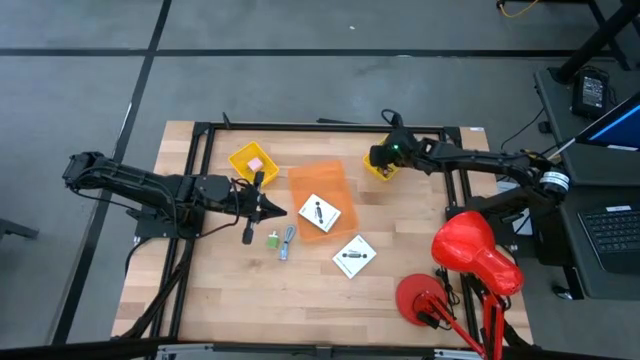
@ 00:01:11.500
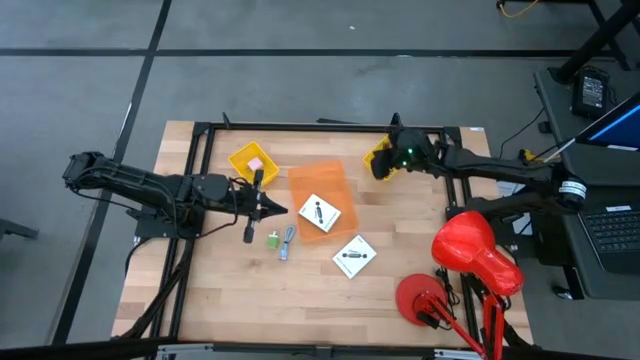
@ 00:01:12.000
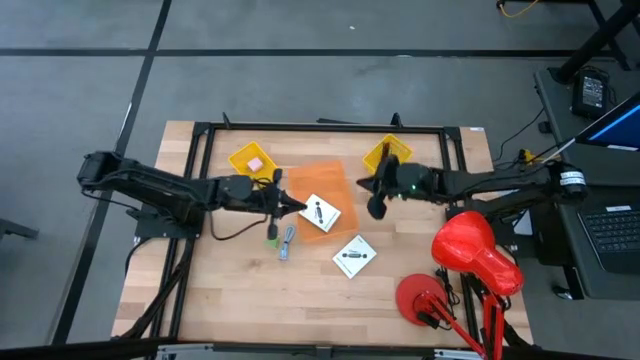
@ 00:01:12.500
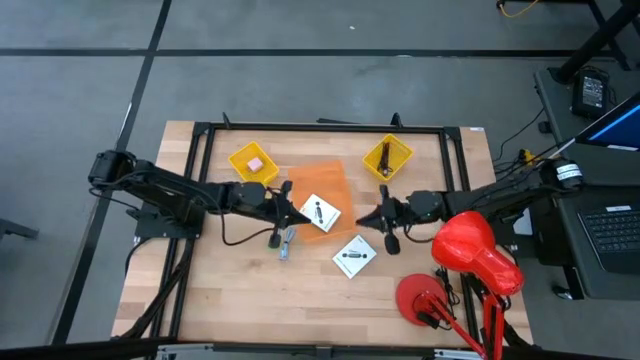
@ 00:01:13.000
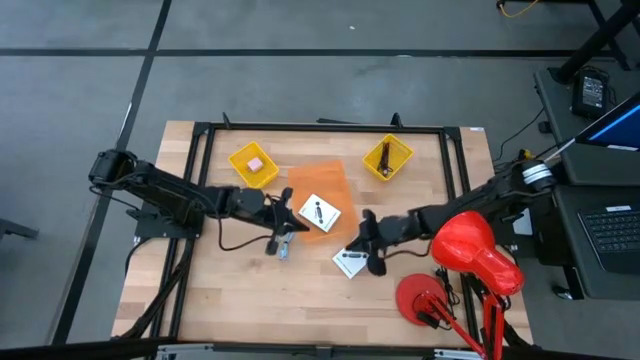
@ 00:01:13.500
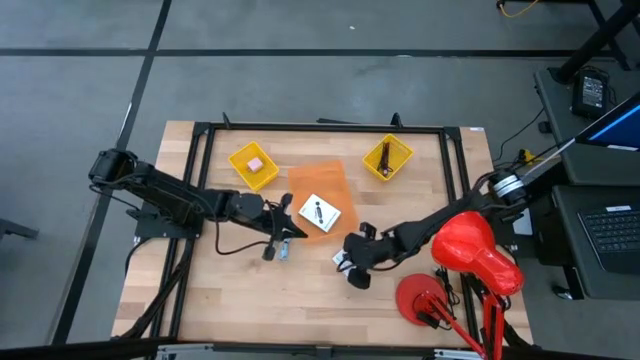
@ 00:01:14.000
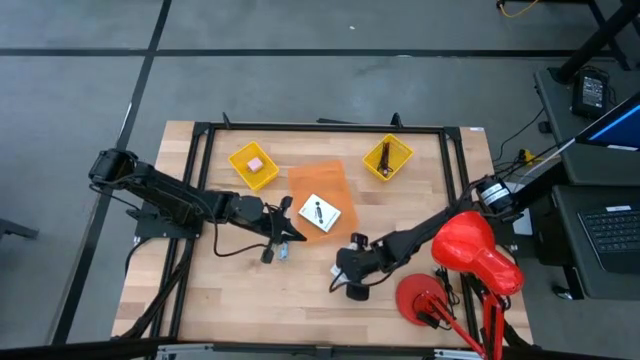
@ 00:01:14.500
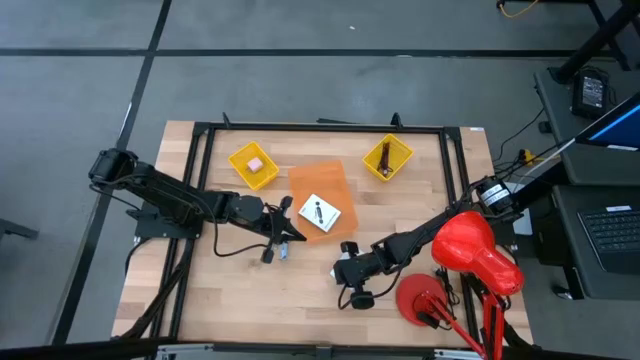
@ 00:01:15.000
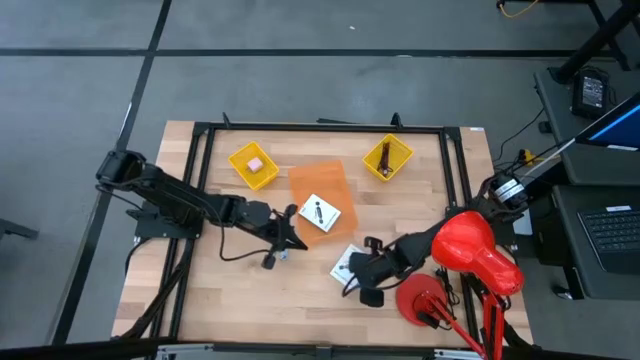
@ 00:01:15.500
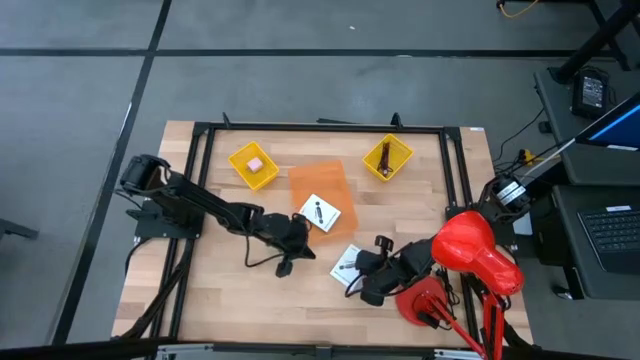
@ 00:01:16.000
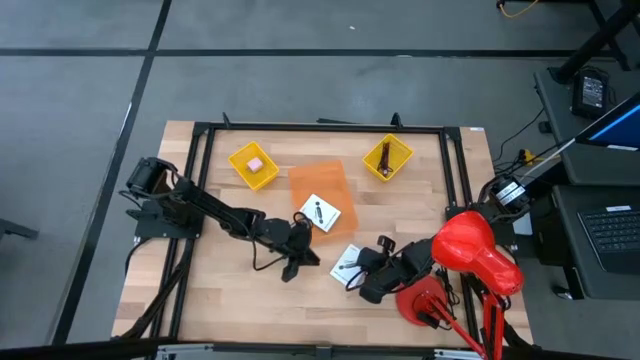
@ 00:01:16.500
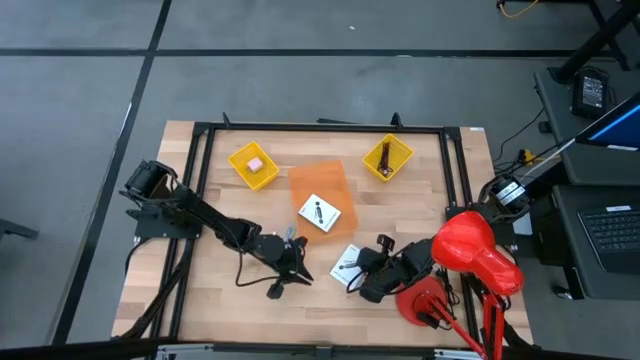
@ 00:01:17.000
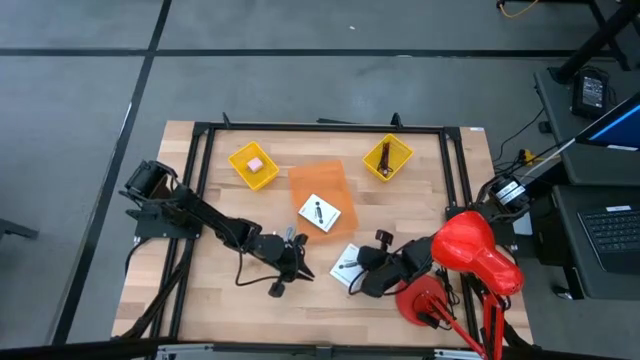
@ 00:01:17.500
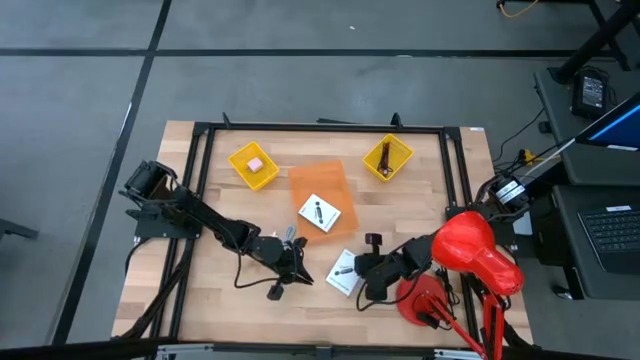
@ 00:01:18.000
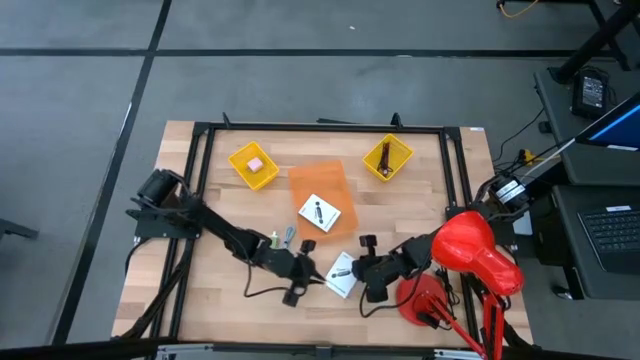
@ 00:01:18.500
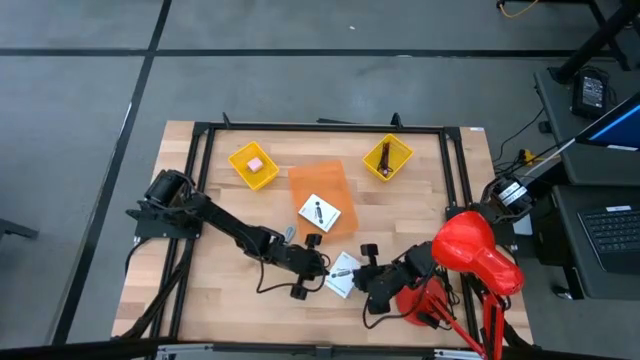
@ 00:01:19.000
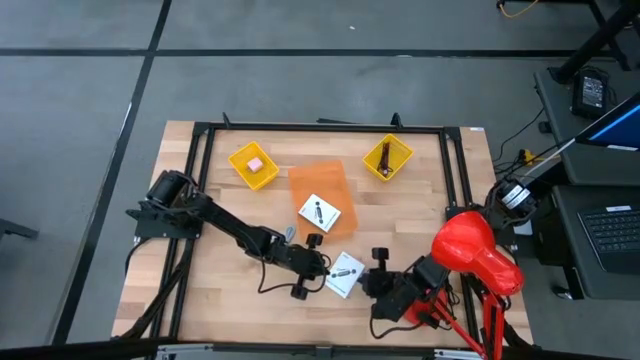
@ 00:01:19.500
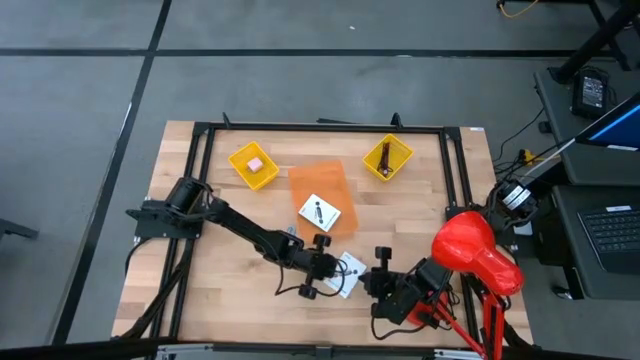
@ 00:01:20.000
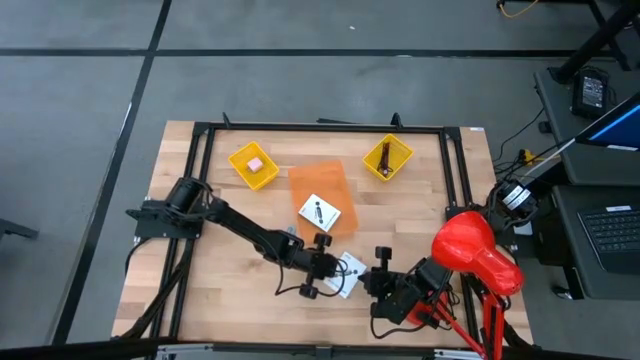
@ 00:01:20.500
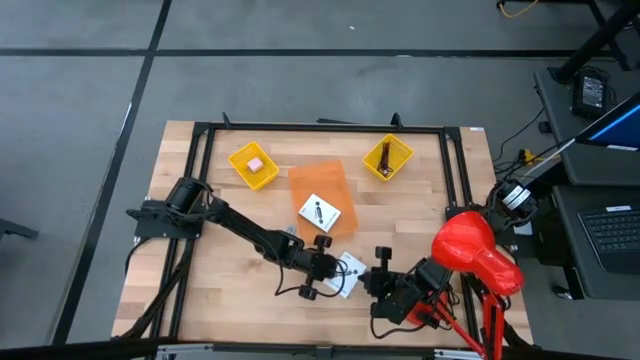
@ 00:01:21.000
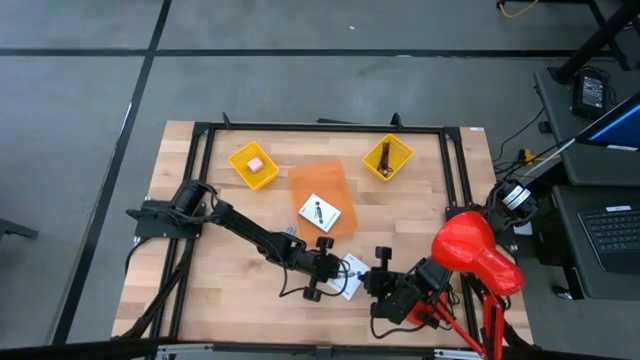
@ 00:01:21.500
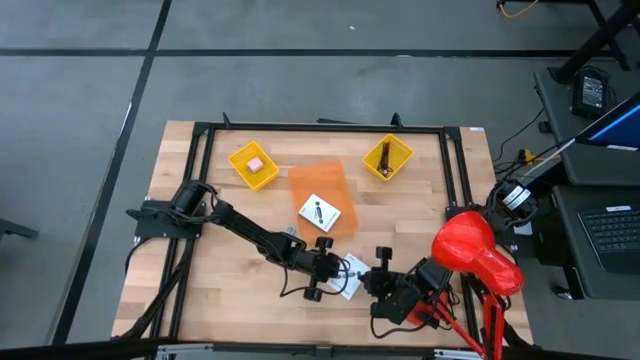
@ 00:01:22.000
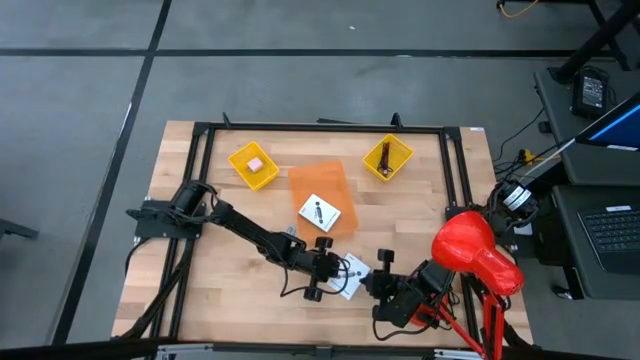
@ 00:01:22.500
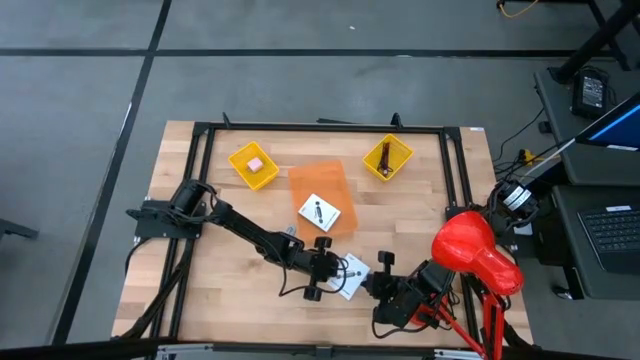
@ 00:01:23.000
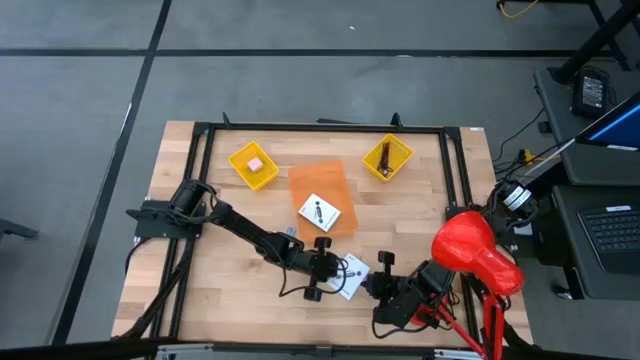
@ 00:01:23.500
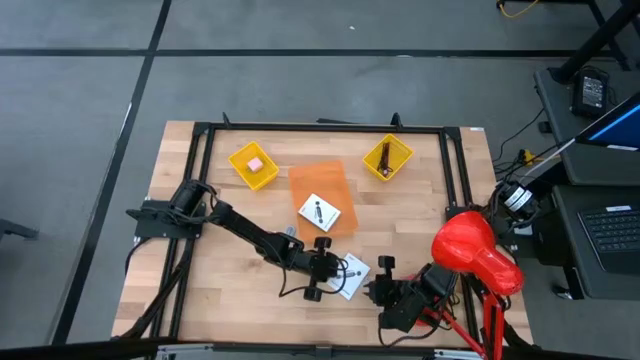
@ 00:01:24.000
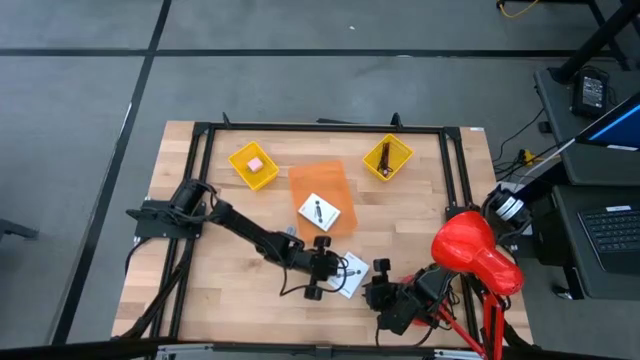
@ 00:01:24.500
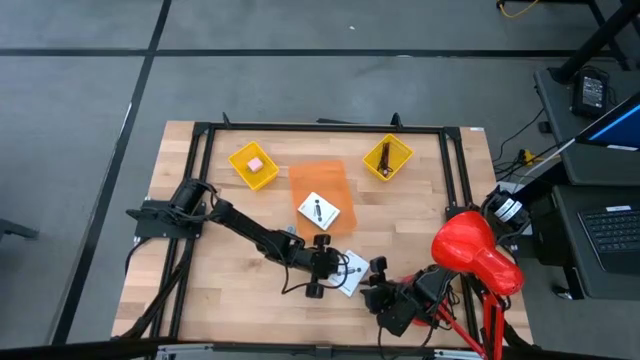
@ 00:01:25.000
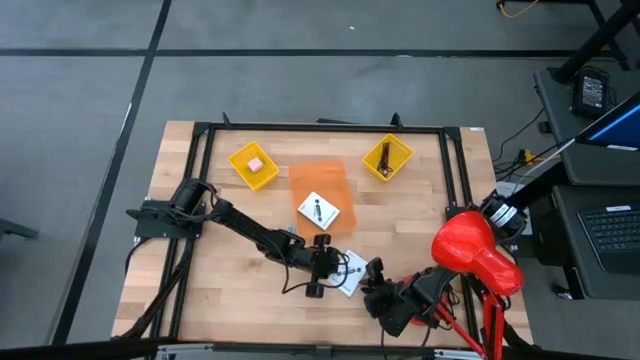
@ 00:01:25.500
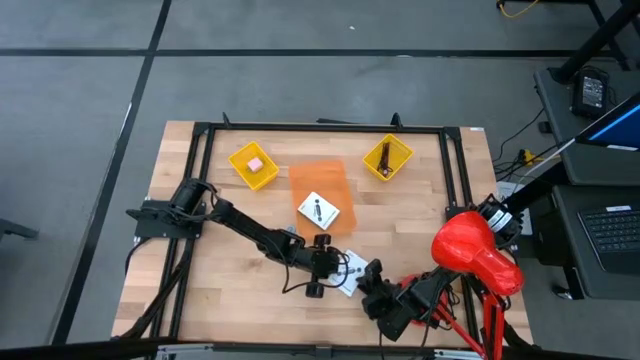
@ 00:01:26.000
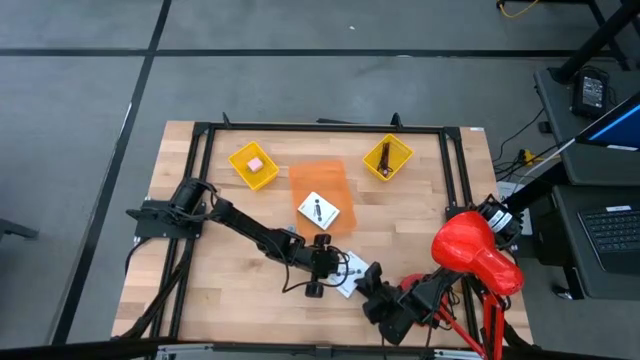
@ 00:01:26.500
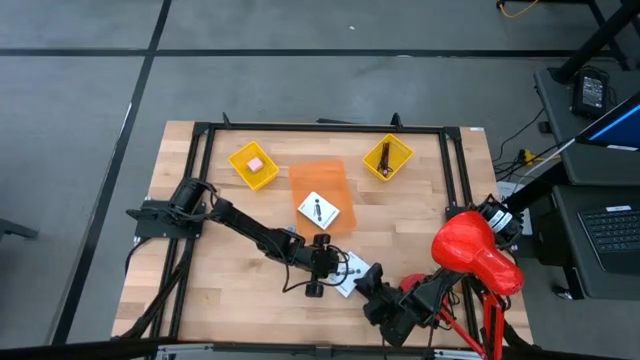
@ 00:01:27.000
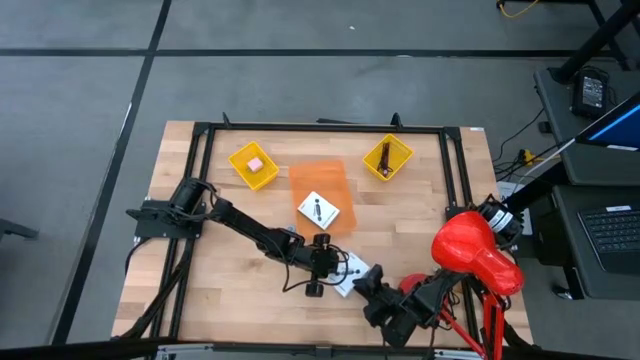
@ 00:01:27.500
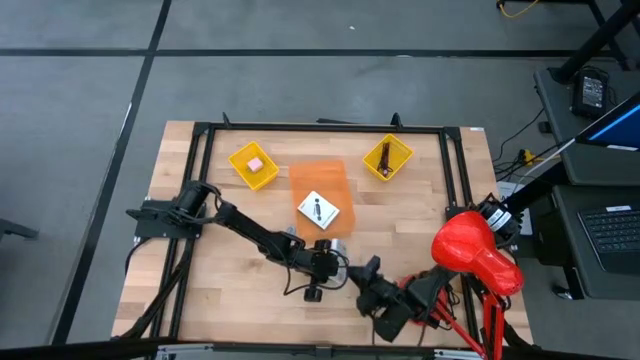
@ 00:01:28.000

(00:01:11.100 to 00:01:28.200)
Task: Pick and place items into bin
Put the card reader box into the orange bin

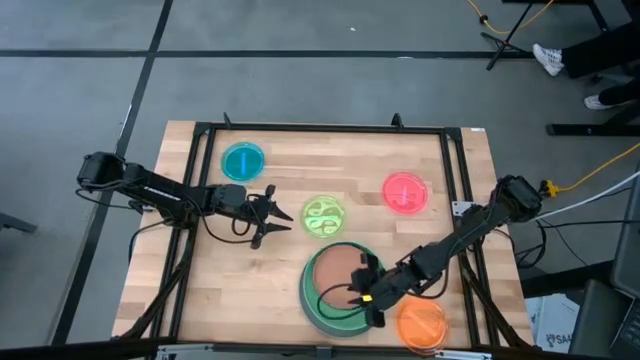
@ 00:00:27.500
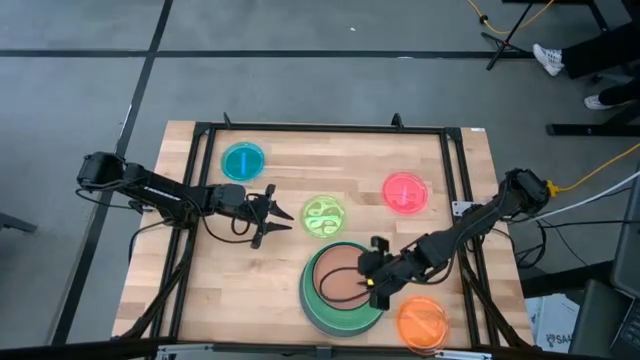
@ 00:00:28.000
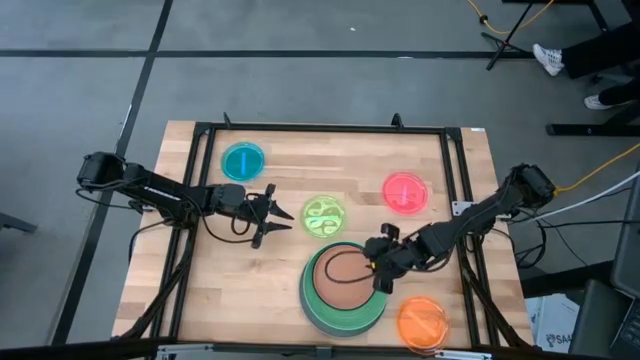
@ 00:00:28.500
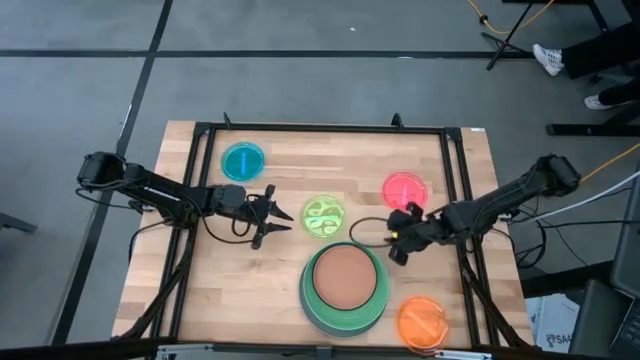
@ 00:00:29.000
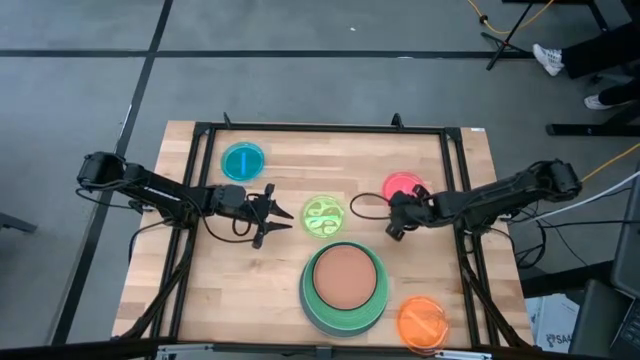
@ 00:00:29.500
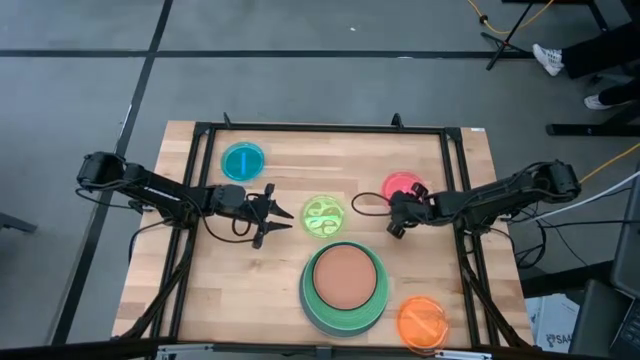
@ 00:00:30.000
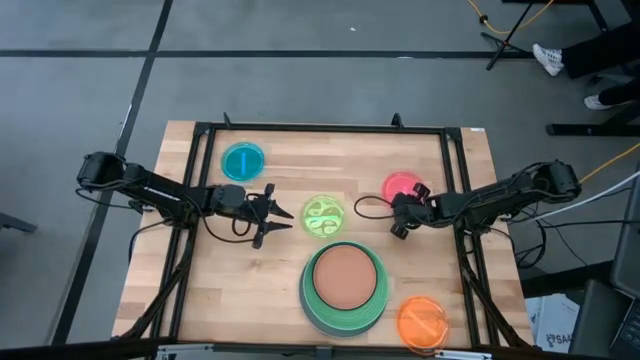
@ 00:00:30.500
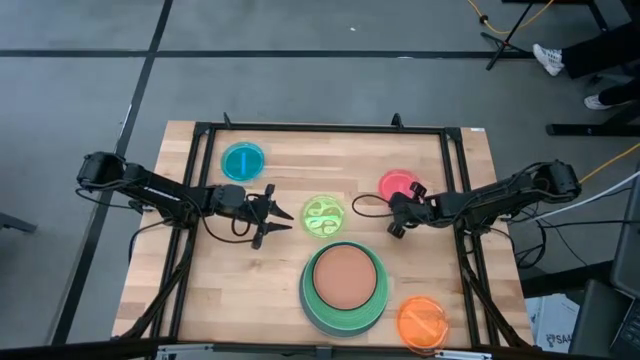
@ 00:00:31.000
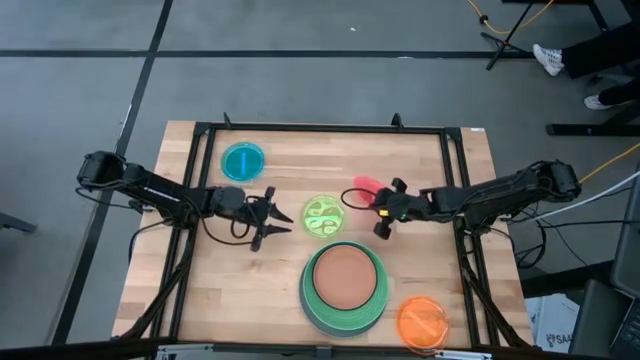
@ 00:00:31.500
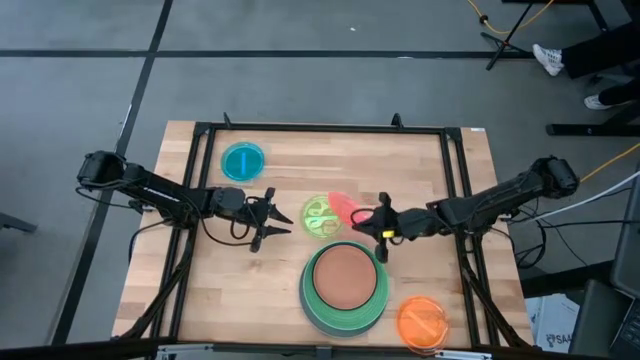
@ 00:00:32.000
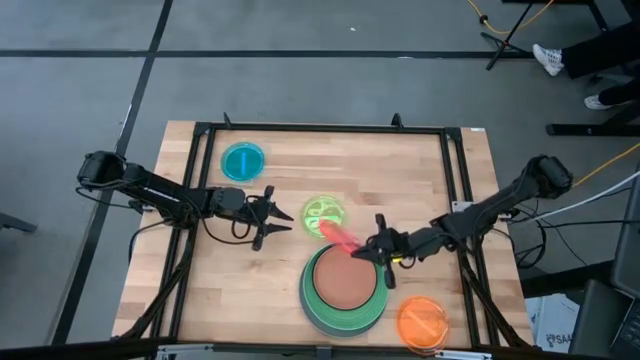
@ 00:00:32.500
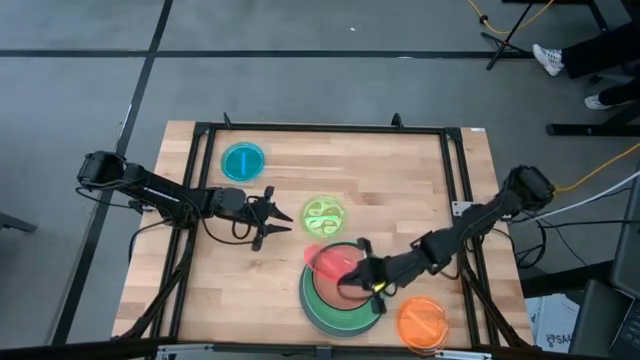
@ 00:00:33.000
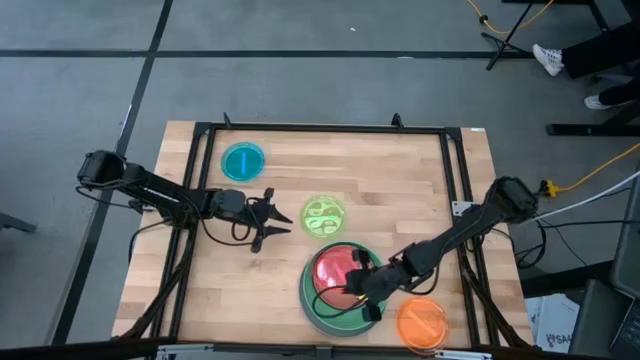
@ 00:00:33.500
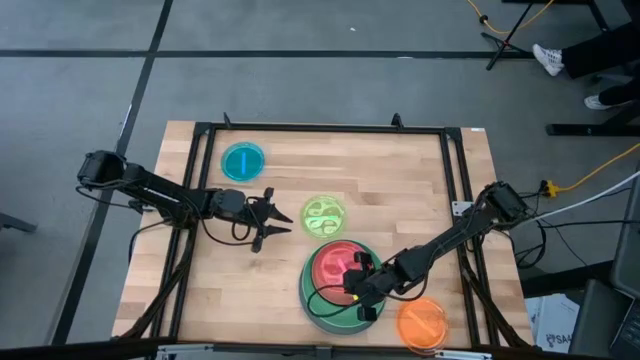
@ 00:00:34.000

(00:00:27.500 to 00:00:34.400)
Task: Stack plastic plates
Stack the pink plate on top of the brown plate
